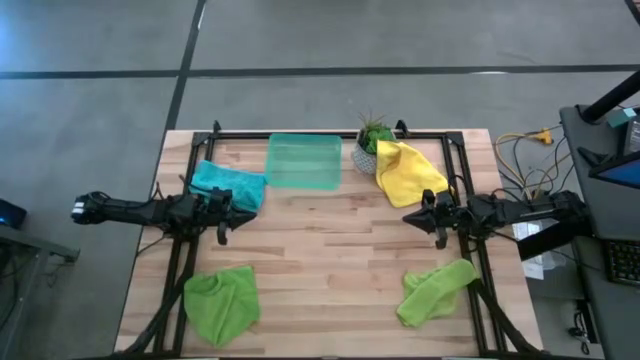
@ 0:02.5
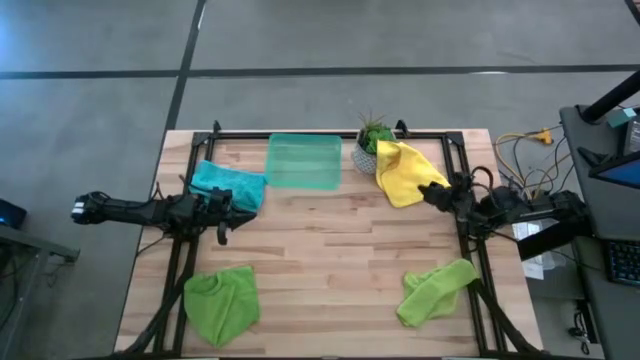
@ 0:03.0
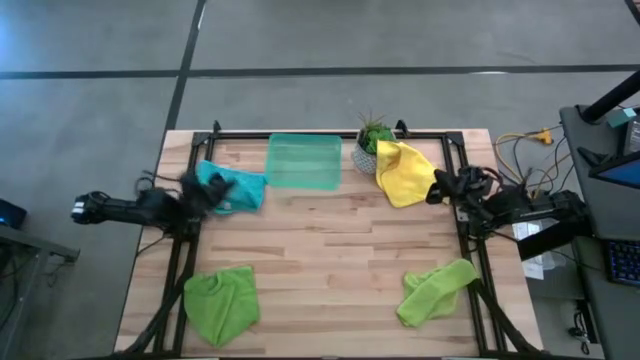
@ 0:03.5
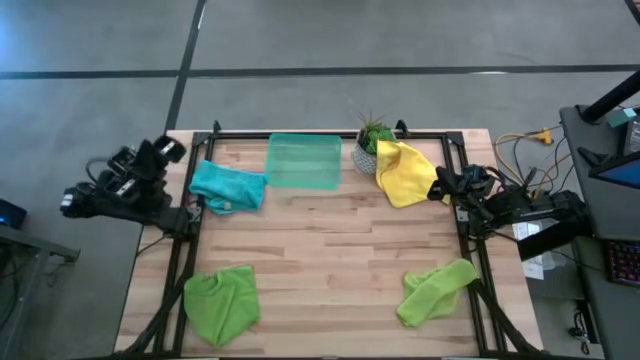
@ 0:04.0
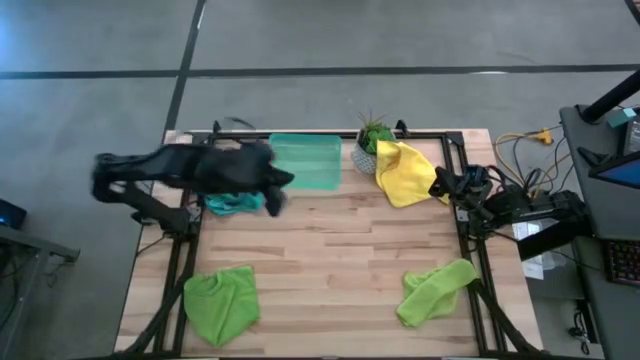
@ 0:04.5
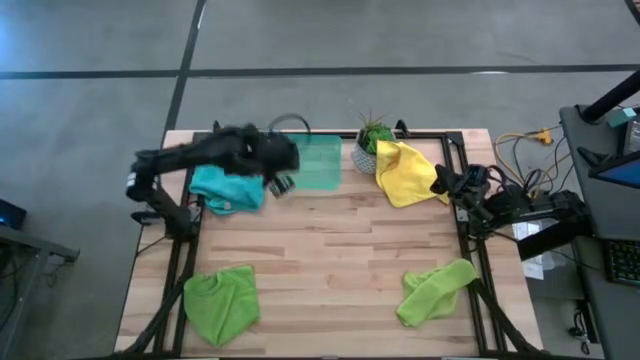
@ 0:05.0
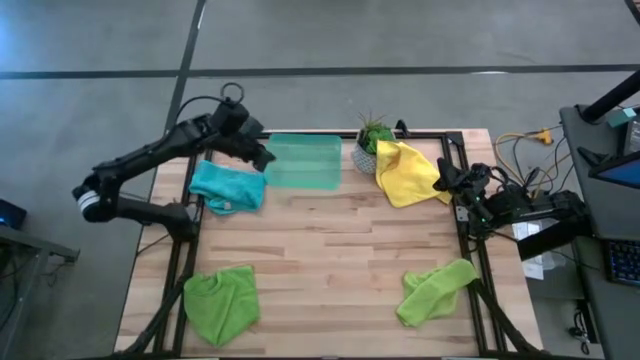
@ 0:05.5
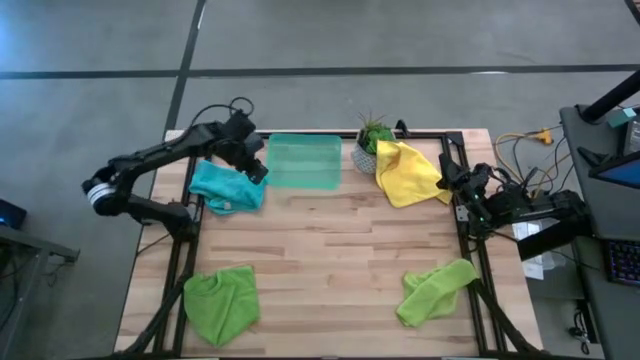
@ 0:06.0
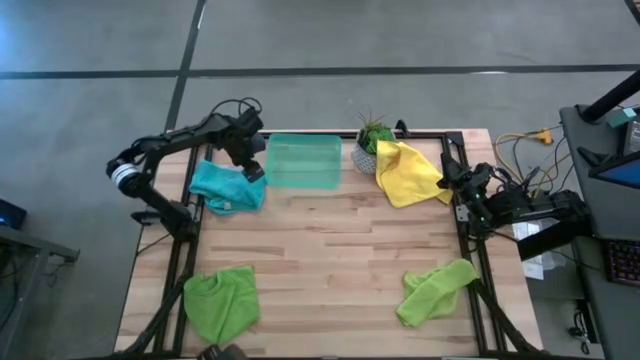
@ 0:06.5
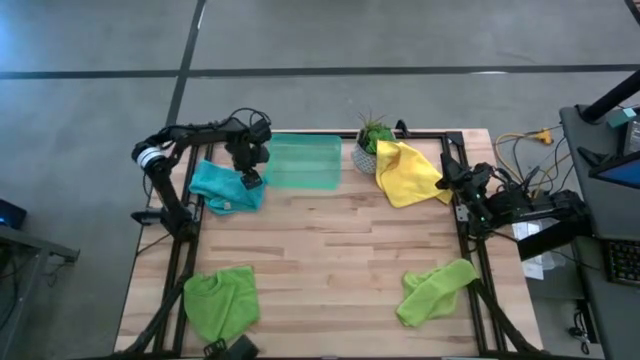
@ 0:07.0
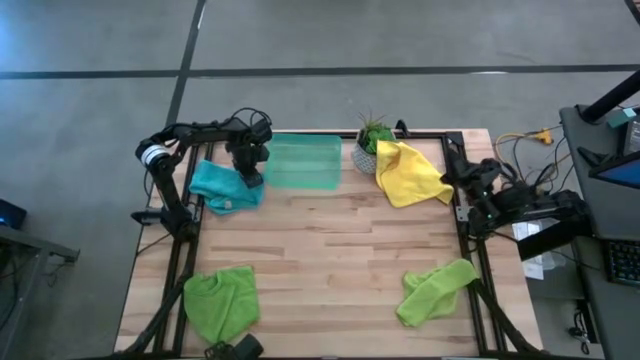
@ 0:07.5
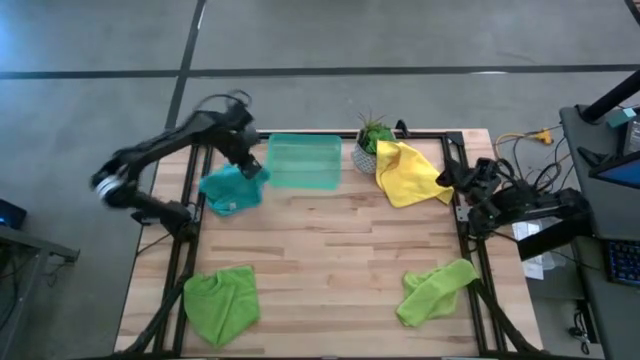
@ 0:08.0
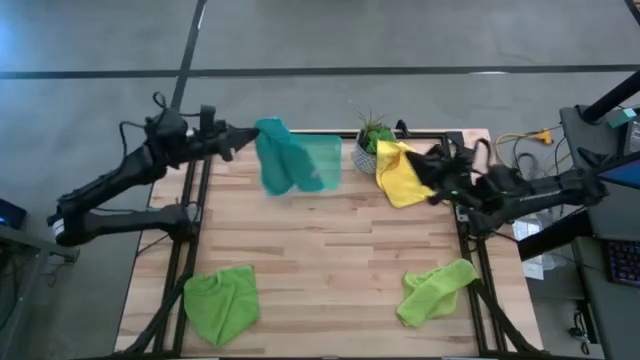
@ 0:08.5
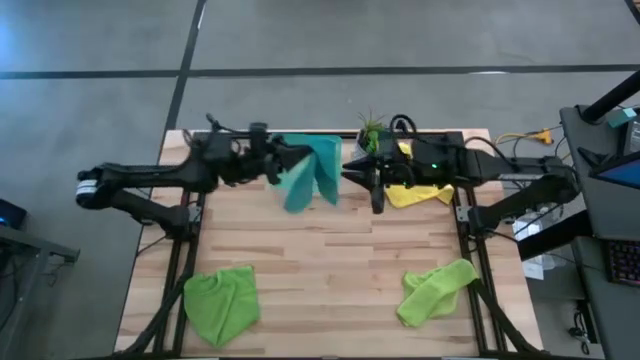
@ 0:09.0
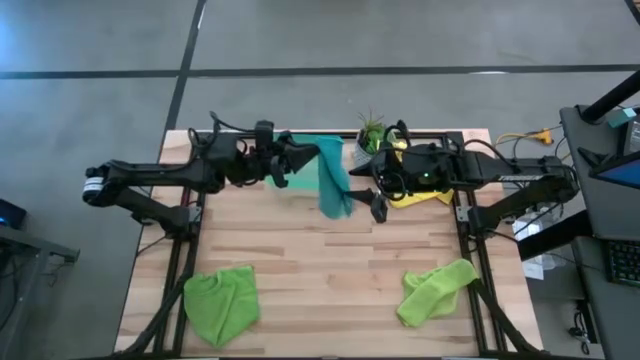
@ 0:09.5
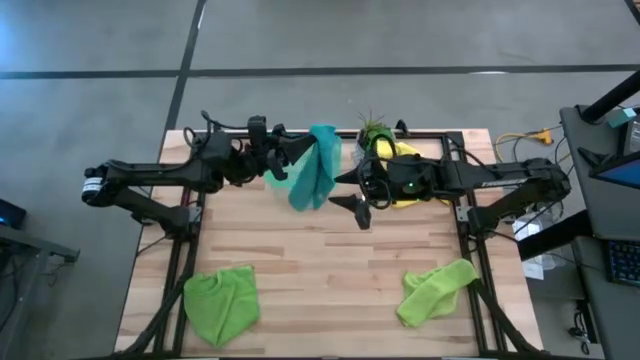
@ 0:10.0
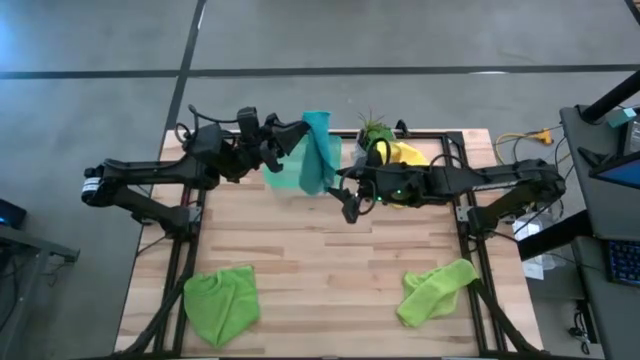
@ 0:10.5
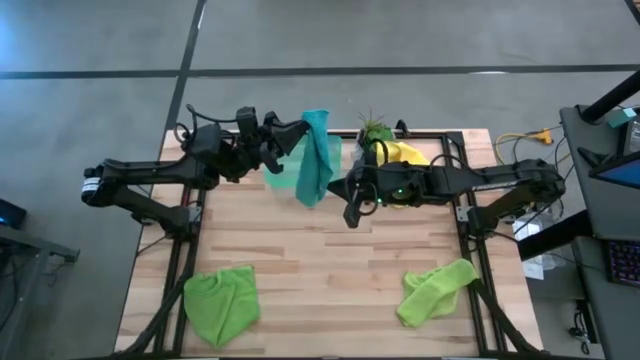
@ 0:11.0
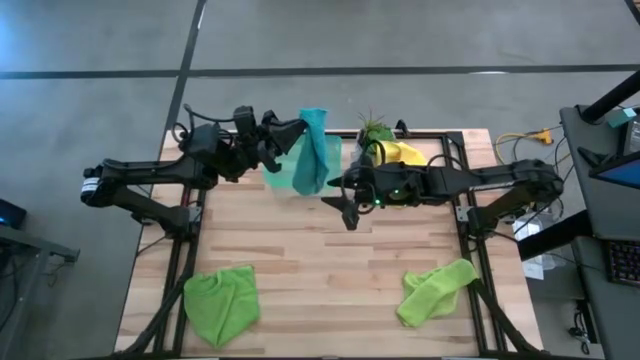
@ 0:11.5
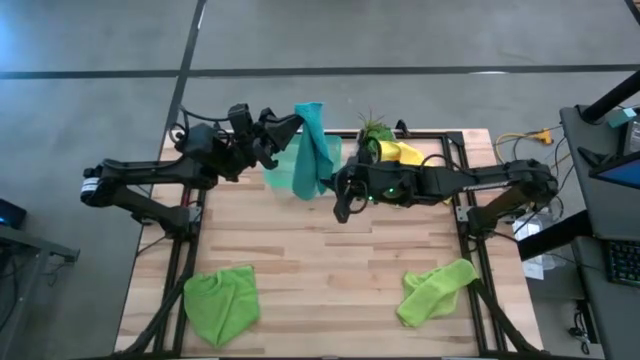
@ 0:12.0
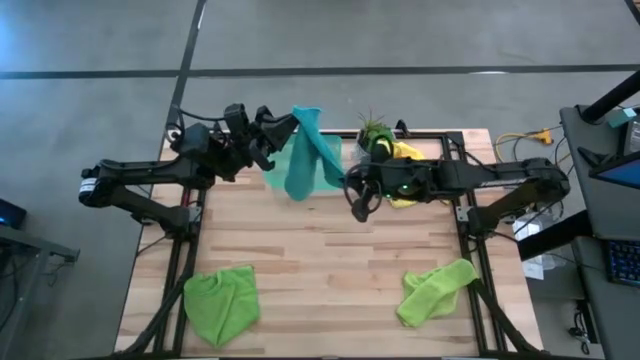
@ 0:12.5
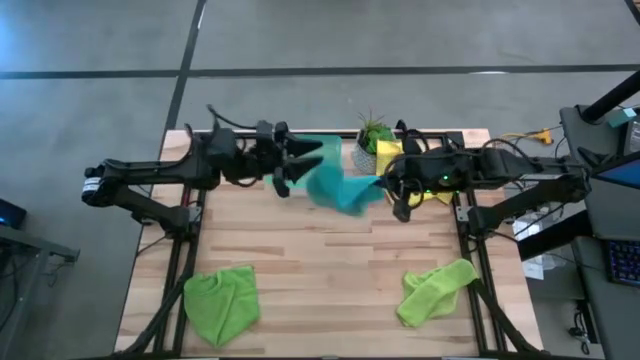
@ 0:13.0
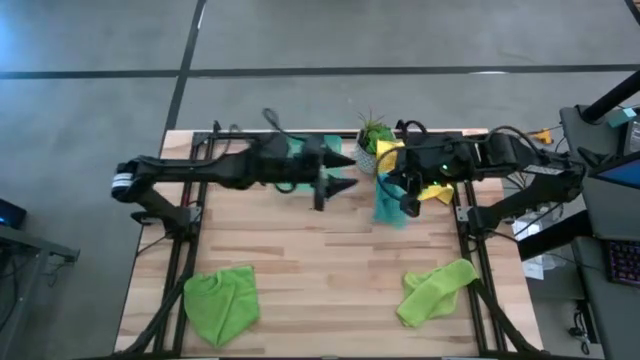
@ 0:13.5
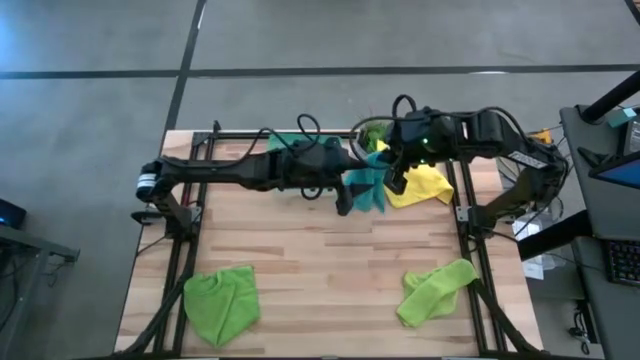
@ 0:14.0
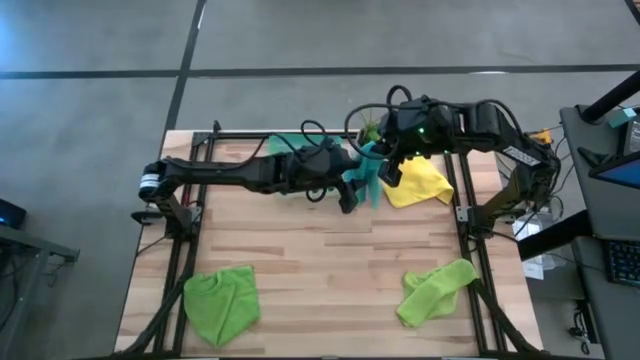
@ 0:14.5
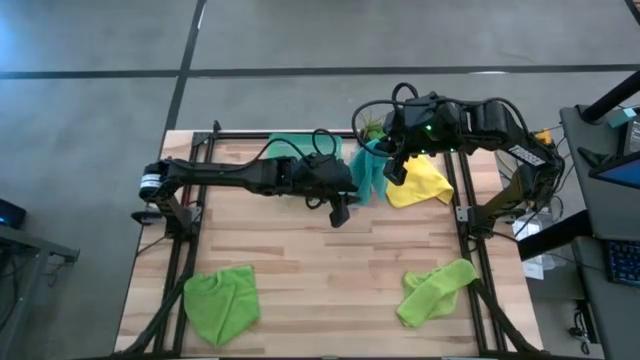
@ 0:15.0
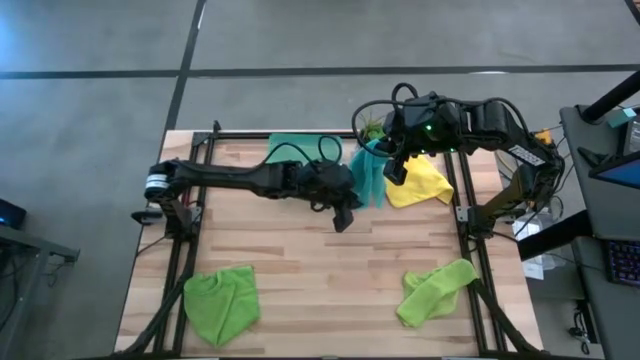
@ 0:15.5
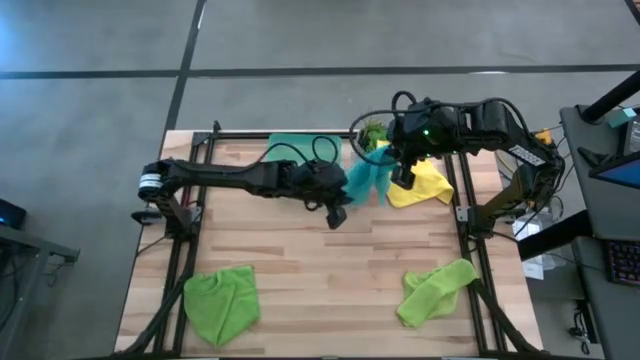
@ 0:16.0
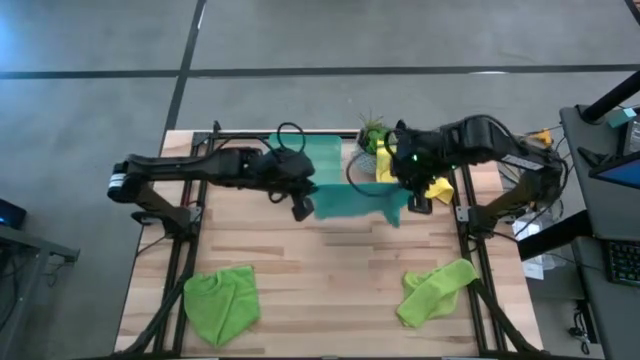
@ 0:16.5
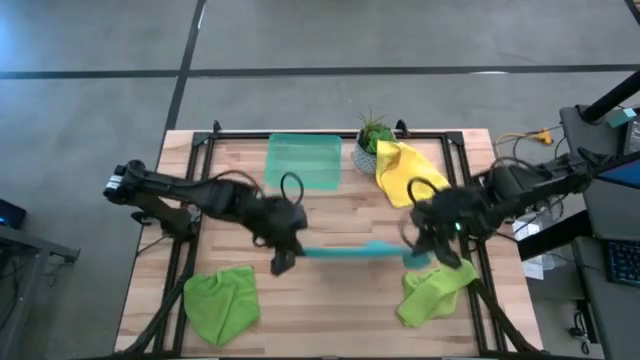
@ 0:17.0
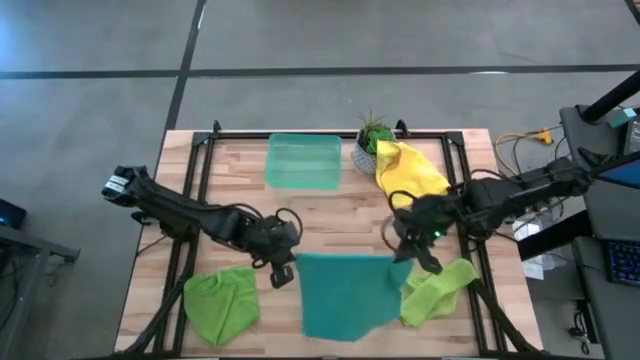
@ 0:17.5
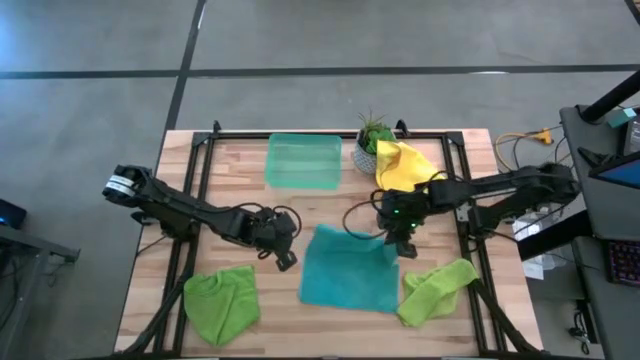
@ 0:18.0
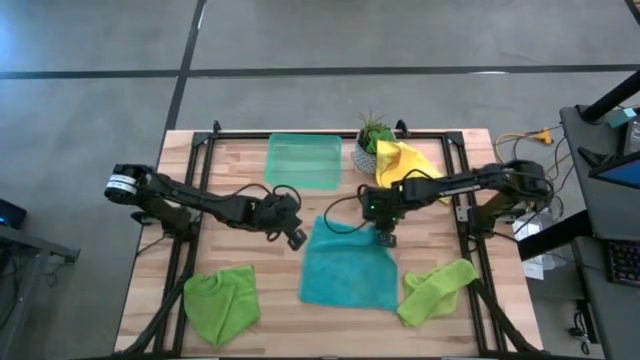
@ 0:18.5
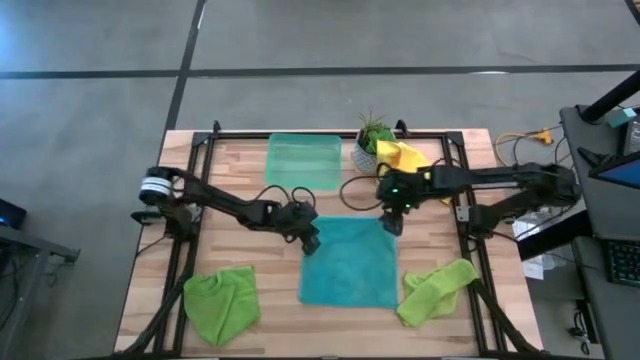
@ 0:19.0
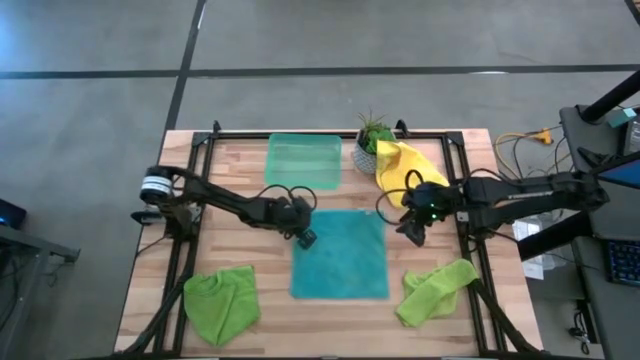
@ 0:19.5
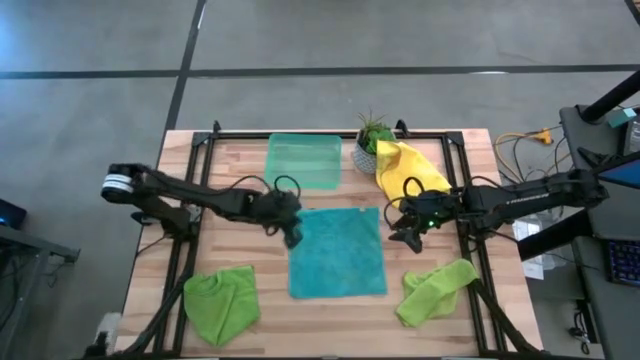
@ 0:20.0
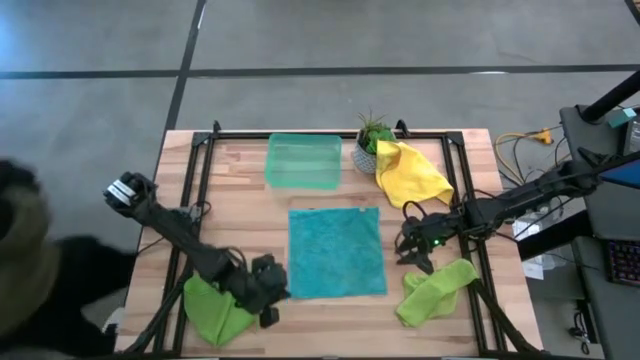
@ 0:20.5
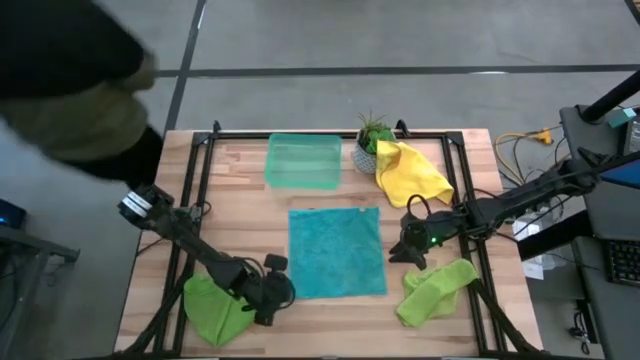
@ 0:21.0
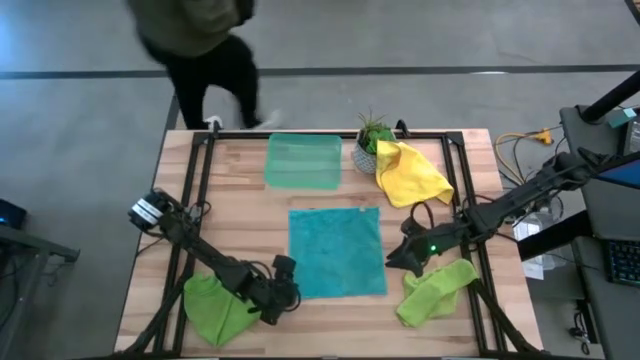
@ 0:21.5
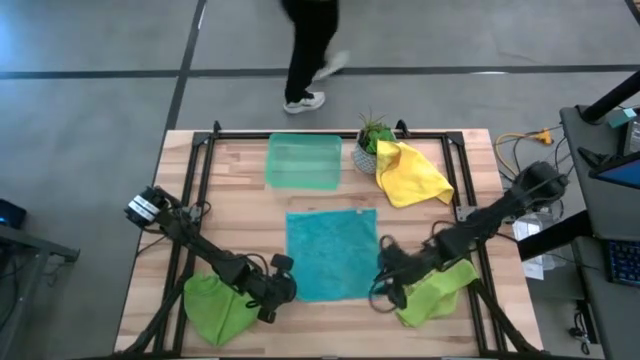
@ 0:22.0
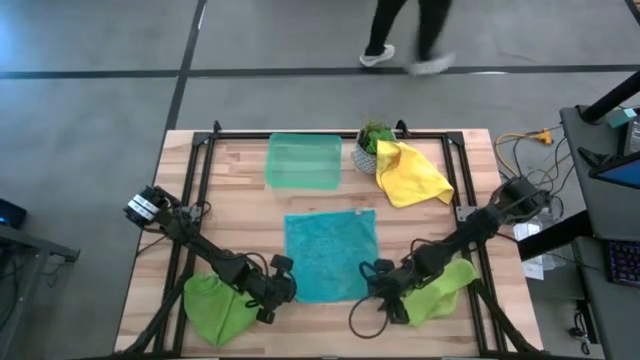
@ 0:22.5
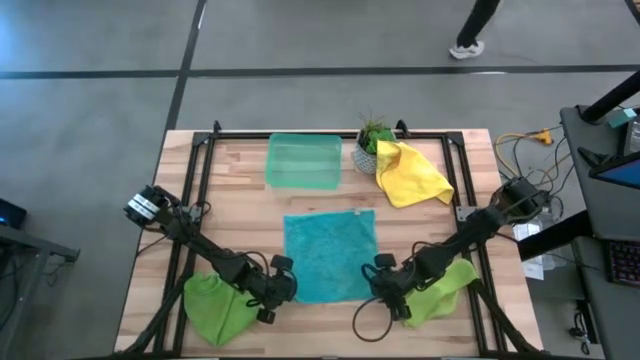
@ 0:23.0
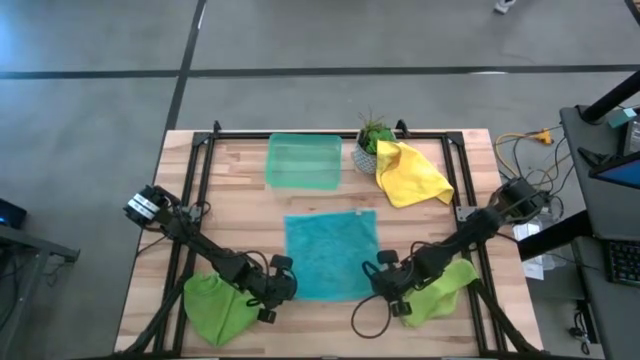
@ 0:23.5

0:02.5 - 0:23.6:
Task: Fold microfiber towels
Fold the blue microfiber towel
